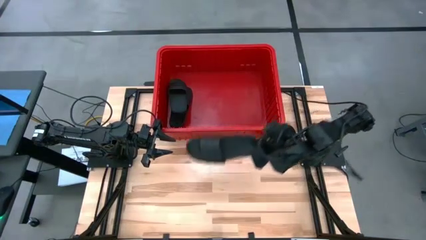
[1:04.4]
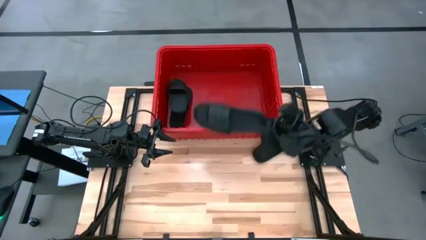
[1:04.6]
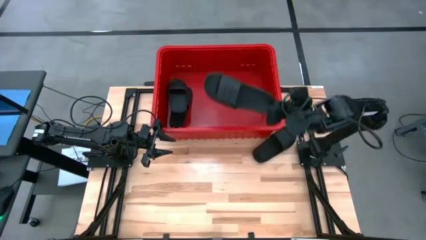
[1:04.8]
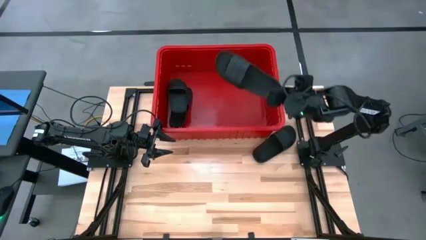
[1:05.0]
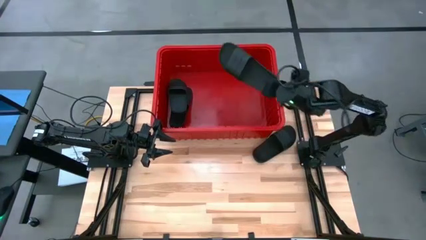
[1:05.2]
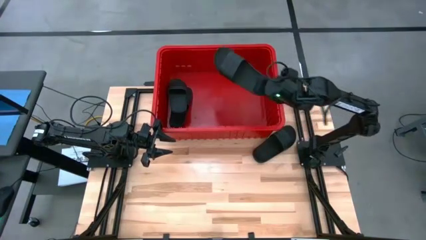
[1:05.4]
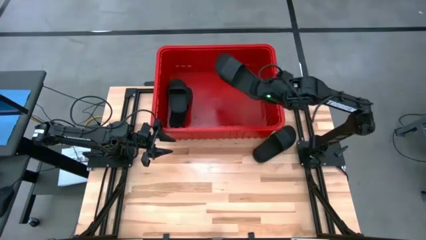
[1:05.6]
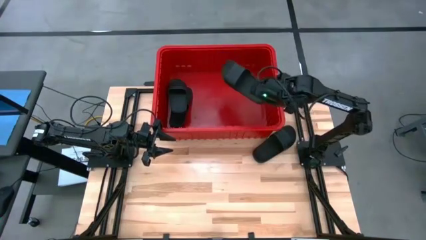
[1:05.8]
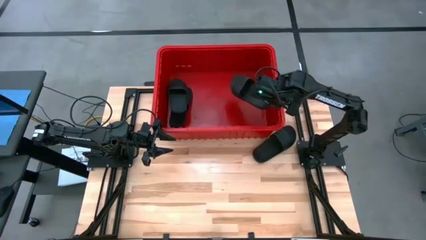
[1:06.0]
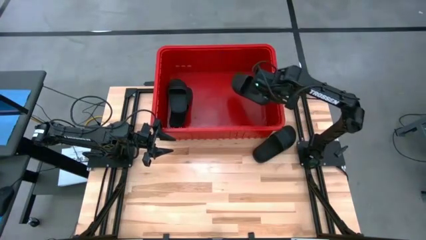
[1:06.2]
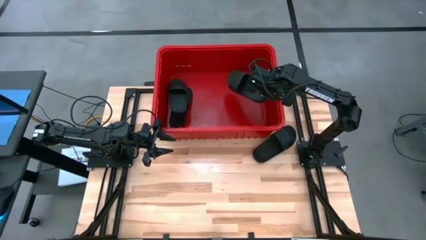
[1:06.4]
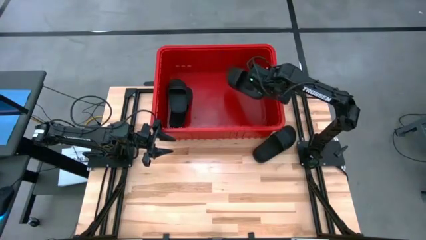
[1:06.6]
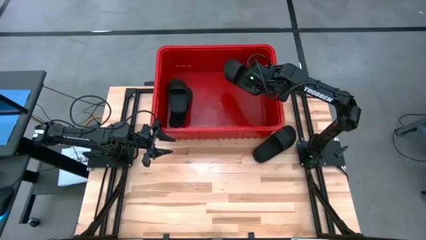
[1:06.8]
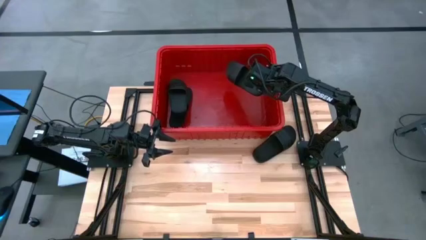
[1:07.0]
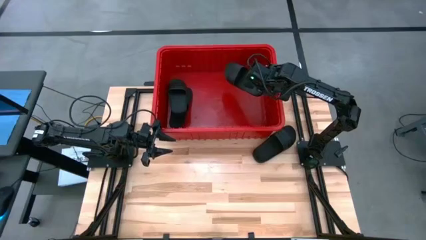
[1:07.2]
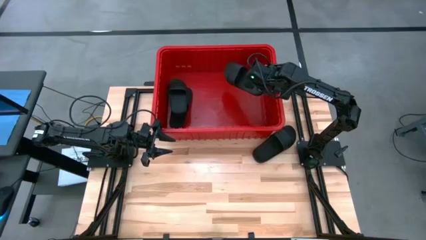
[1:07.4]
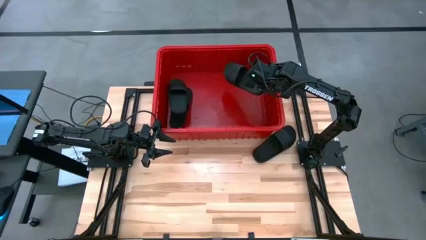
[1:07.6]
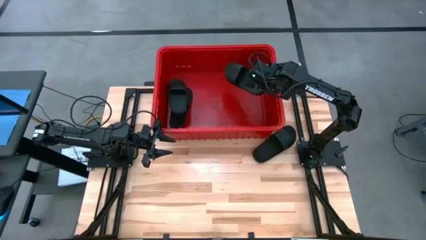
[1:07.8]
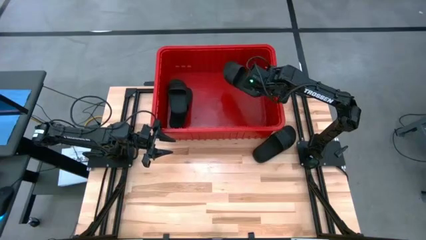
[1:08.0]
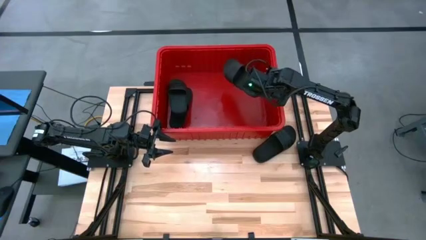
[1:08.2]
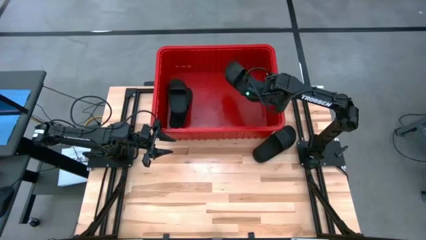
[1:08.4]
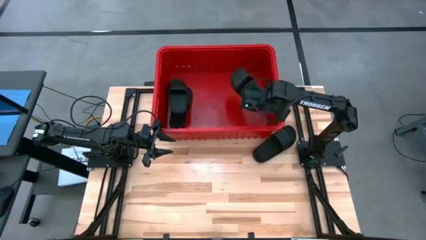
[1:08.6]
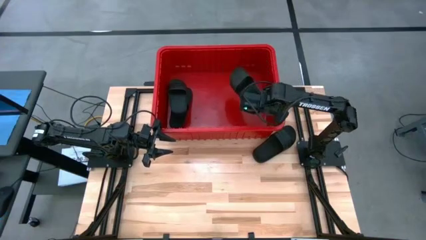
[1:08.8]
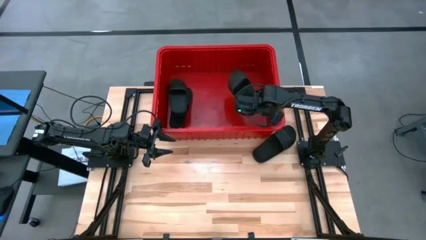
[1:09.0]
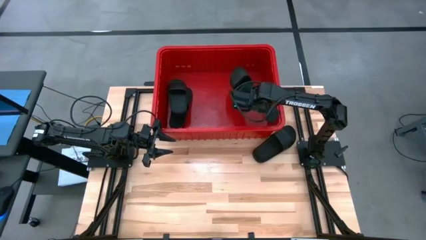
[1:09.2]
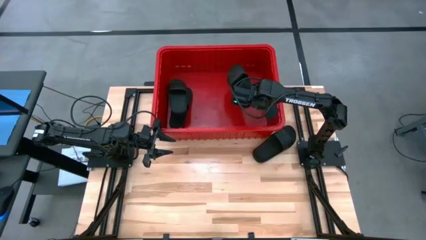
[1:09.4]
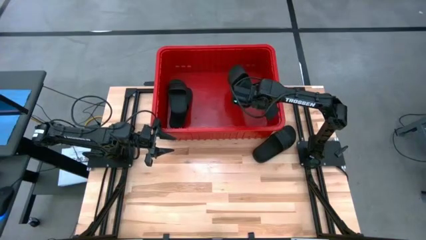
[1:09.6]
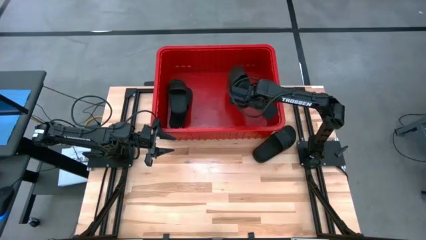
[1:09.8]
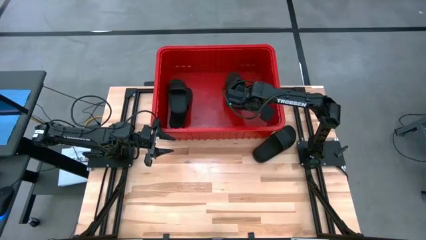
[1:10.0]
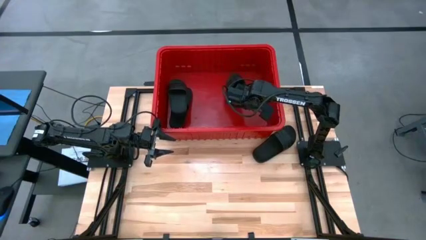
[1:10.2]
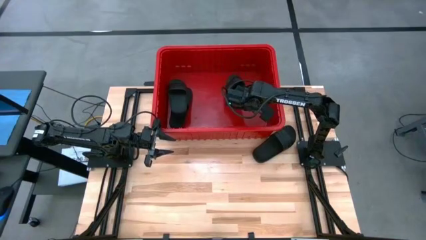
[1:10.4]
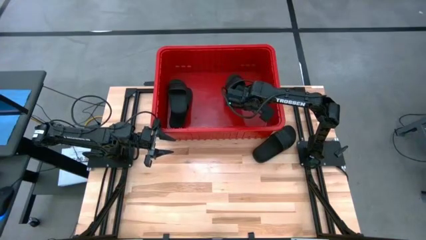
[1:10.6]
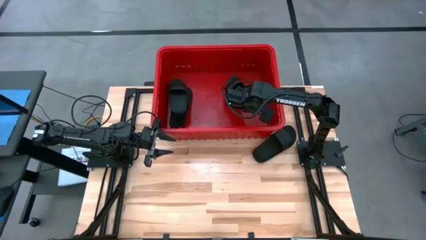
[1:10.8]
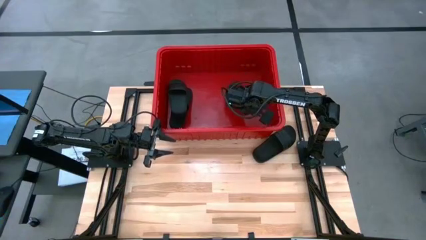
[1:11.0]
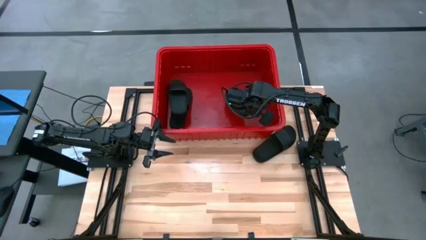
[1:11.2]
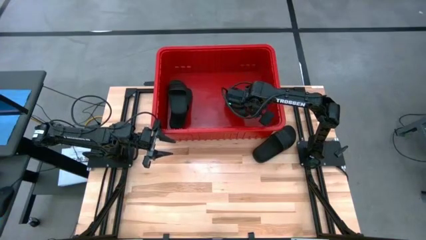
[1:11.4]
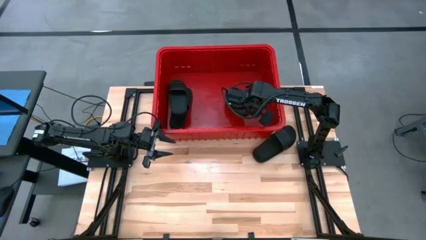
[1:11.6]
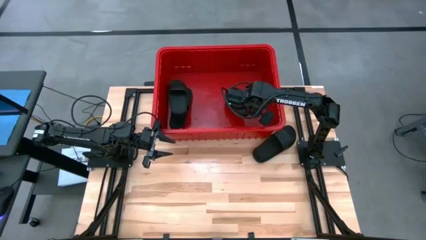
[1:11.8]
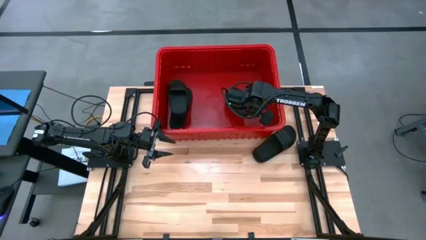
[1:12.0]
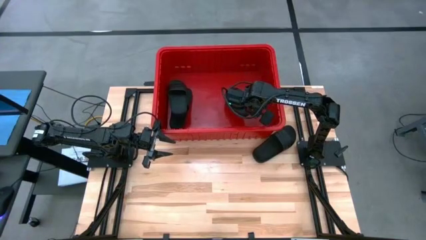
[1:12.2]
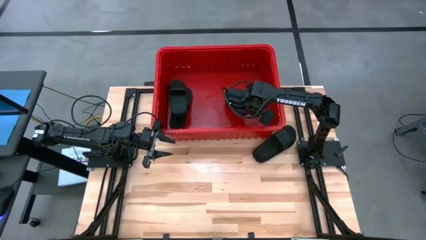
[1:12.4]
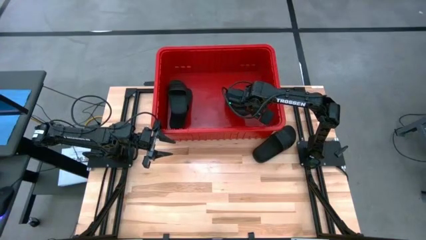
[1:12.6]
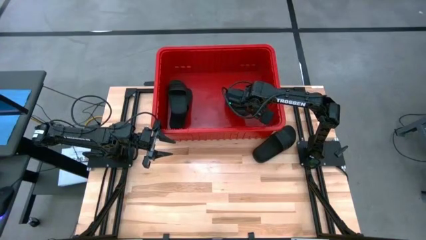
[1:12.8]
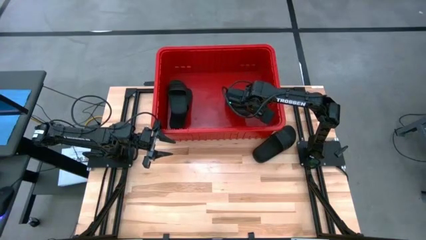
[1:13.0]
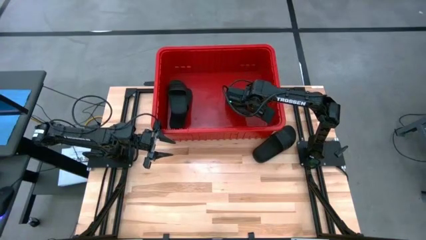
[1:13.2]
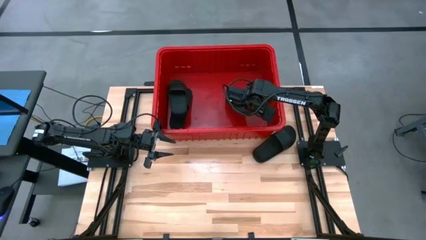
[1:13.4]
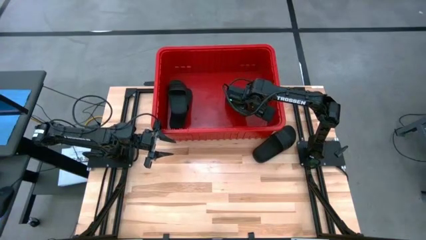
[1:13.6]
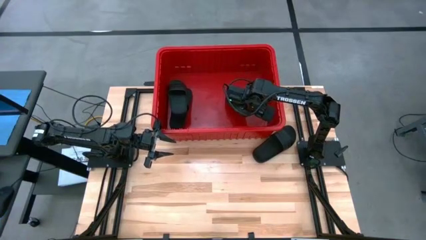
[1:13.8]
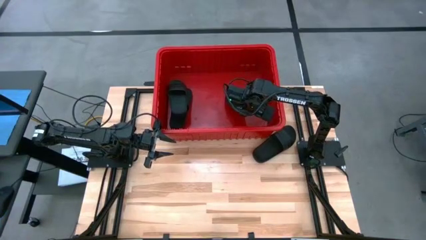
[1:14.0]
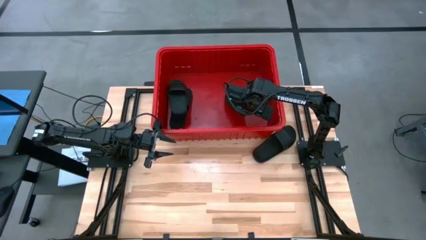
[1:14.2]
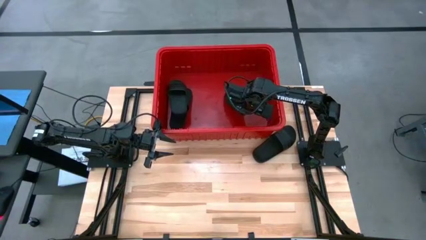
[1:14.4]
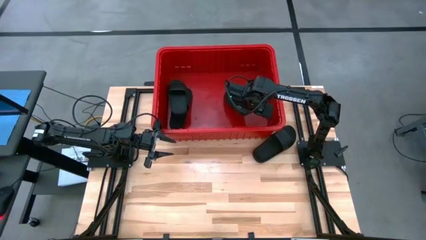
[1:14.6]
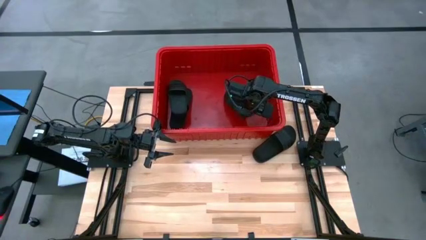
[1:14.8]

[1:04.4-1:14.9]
Task: Pick and place slides into bin
Put the left slide into the bin next to the other stacked slides

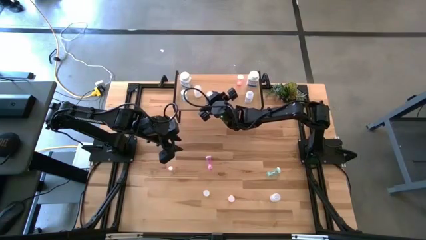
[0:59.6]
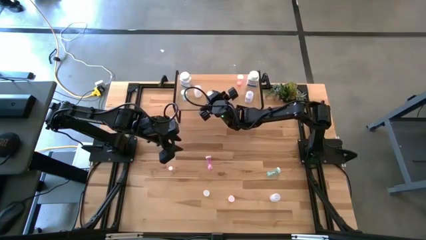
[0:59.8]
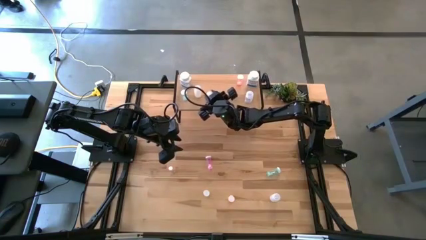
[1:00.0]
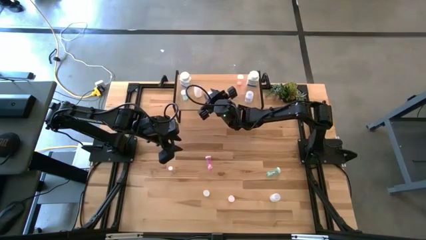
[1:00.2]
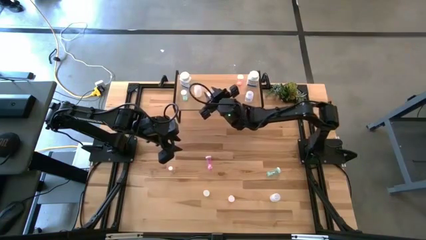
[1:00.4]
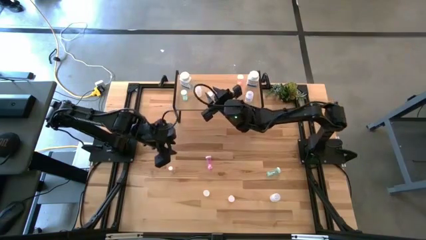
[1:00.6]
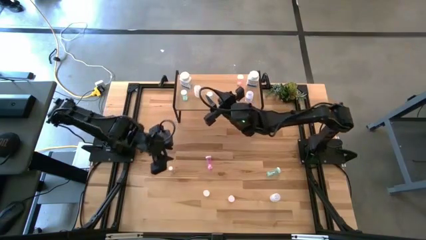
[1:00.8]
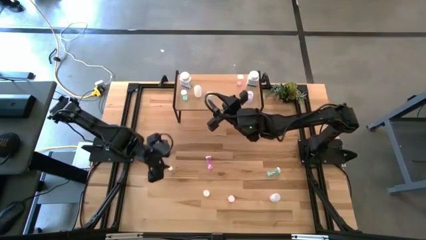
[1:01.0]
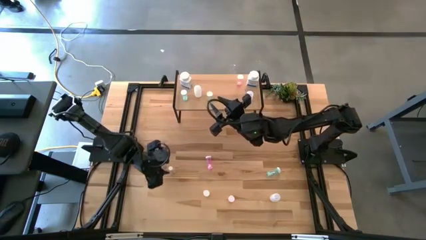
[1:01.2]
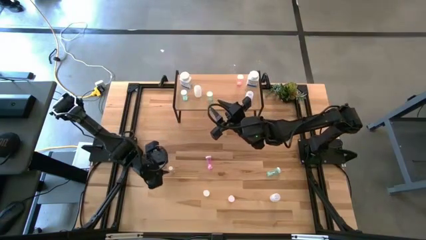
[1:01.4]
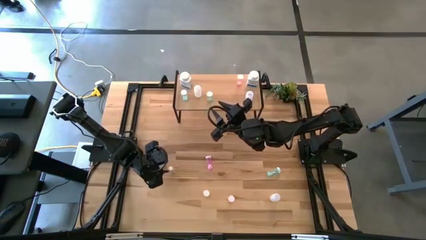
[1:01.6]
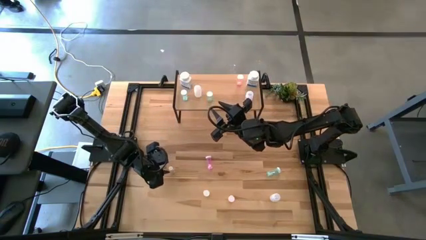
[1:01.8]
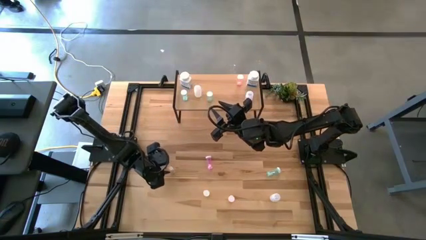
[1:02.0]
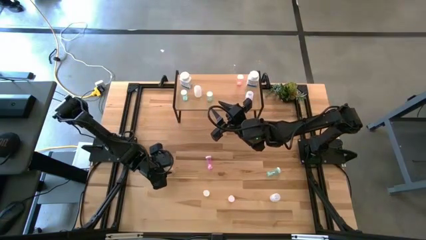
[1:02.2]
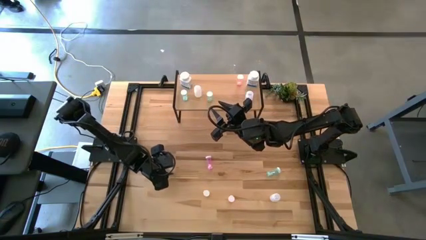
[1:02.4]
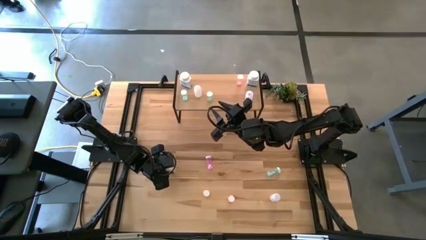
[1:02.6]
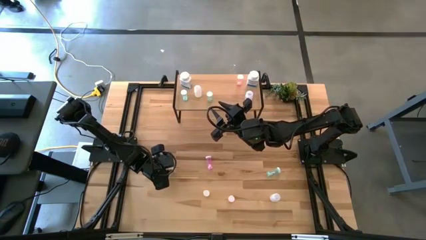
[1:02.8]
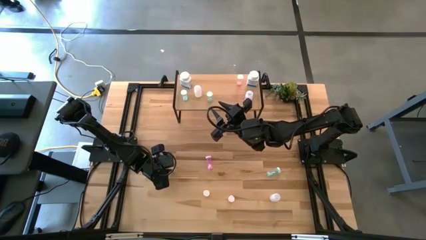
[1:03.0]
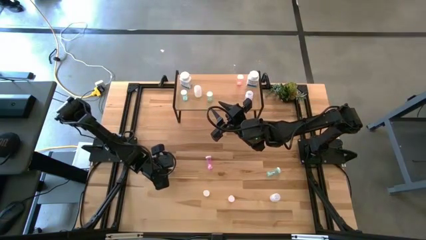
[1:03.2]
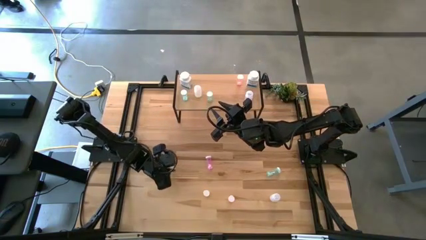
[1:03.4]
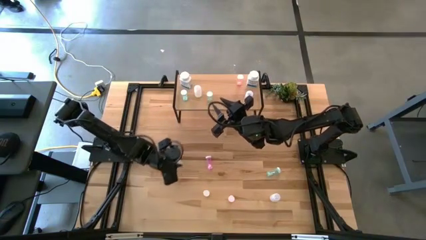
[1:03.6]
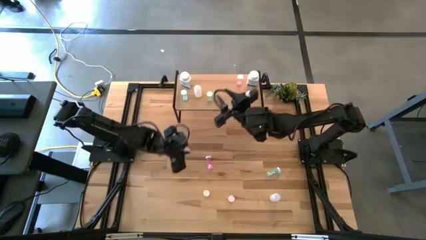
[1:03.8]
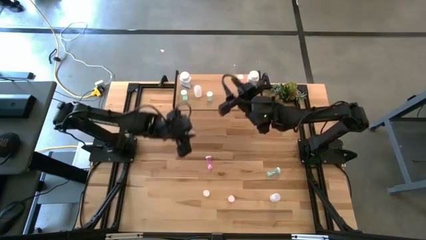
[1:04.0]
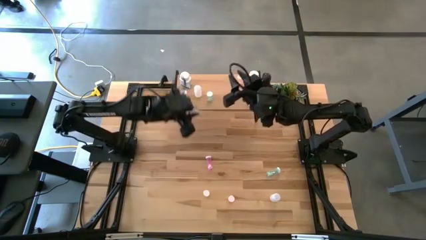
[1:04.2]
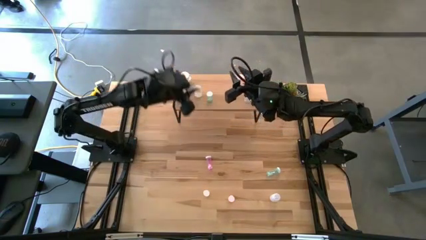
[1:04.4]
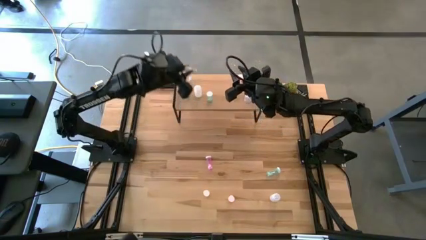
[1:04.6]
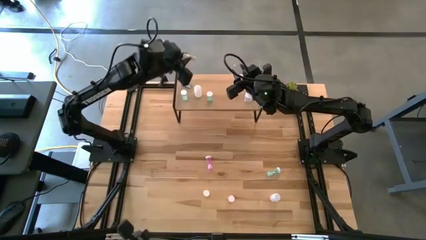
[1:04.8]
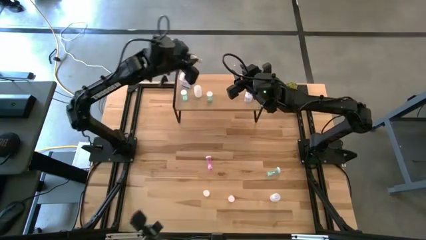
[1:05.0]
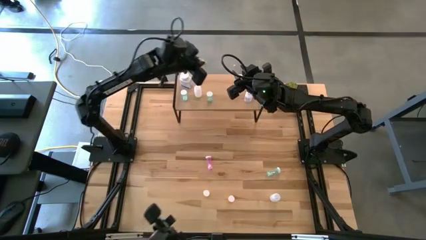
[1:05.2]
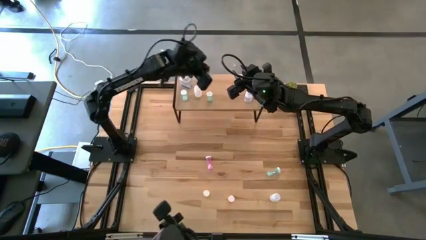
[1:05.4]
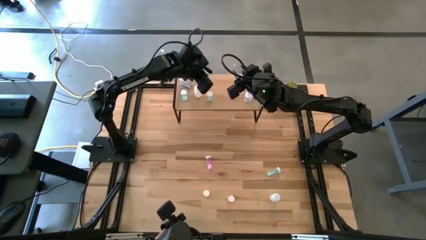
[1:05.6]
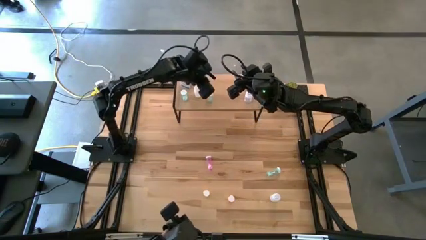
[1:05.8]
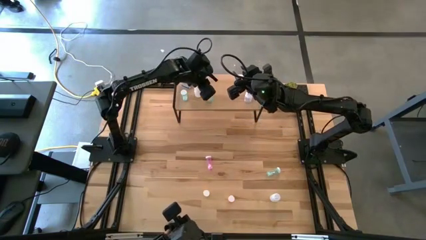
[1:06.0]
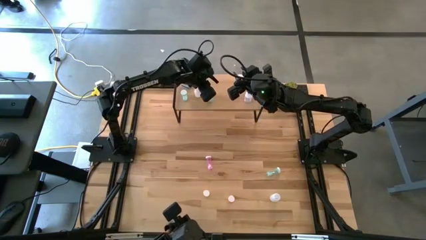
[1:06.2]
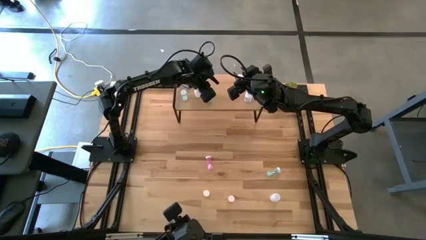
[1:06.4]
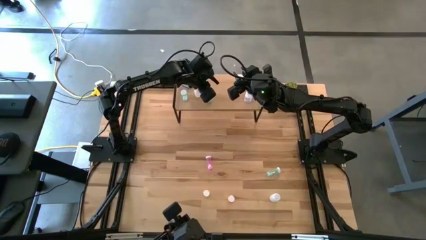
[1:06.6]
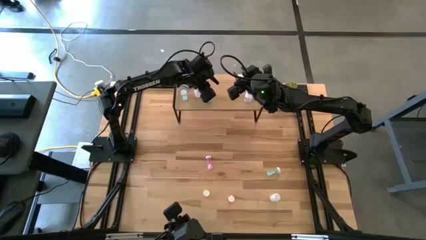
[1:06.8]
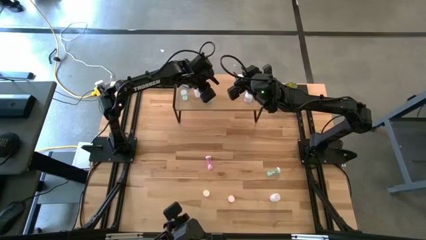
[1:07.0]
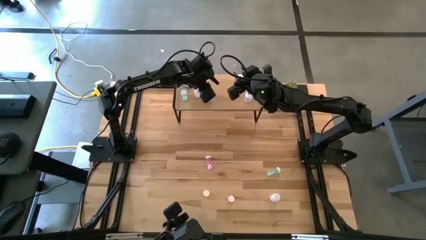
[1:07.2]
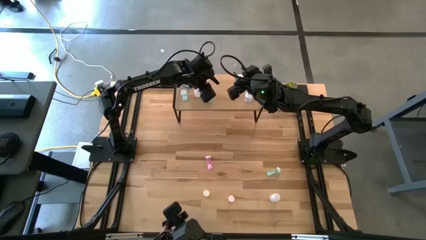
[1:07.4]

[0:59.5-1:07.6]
Task: Pick and place medicine bottles onto shelf by color
Put the small white medicine bottle on the shelf
